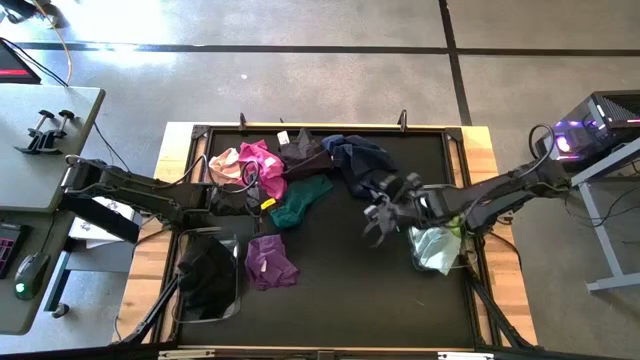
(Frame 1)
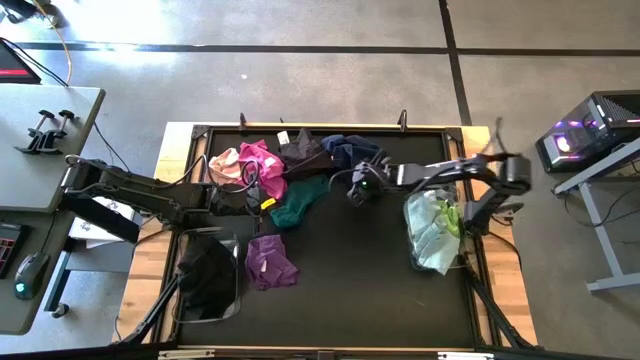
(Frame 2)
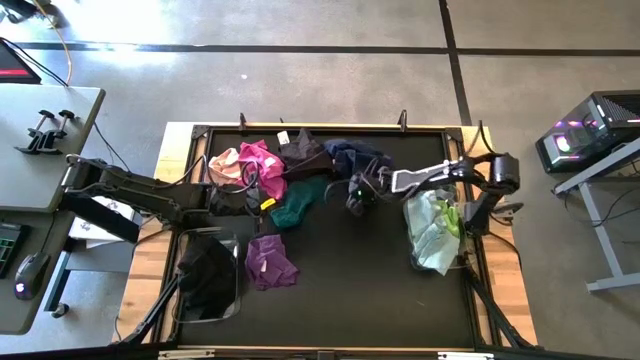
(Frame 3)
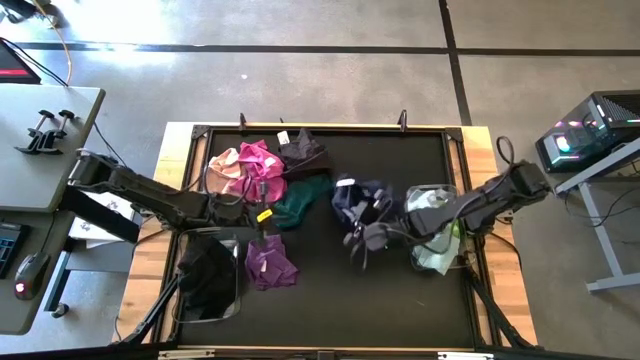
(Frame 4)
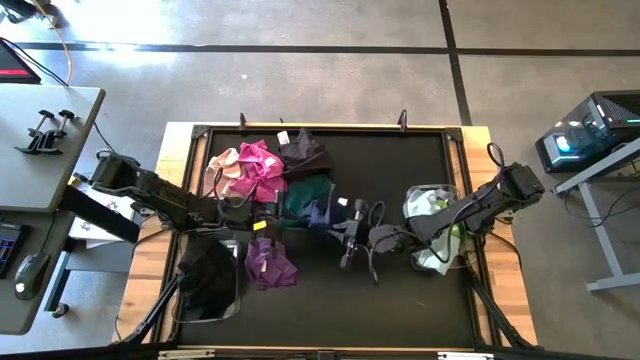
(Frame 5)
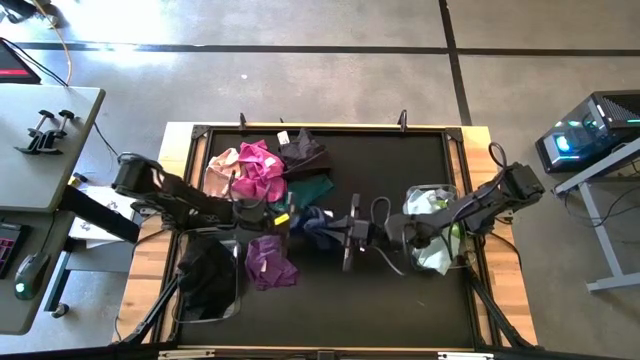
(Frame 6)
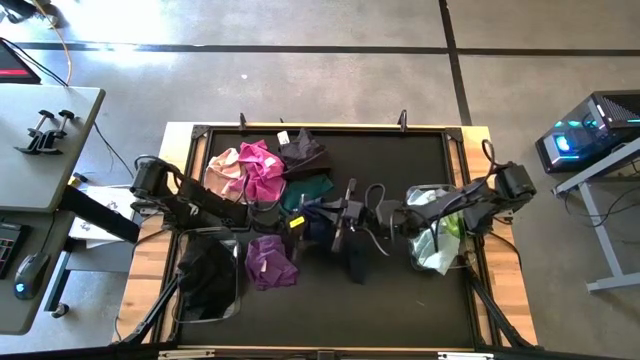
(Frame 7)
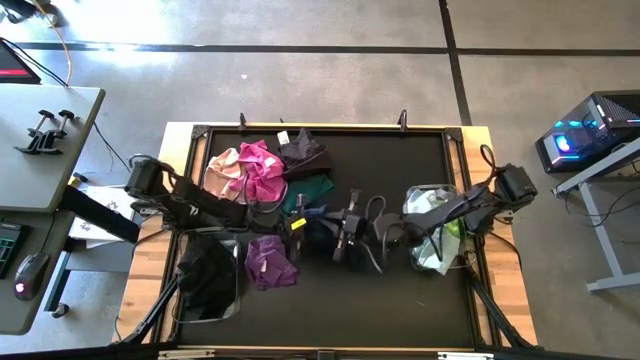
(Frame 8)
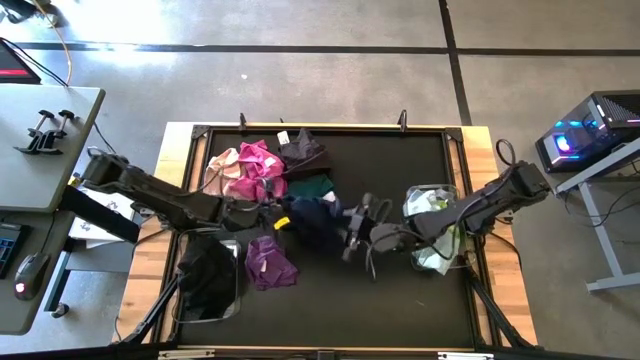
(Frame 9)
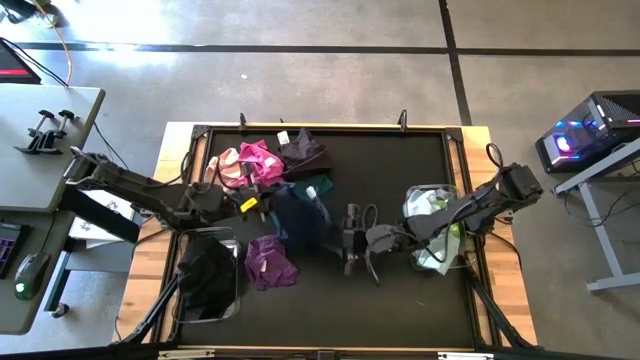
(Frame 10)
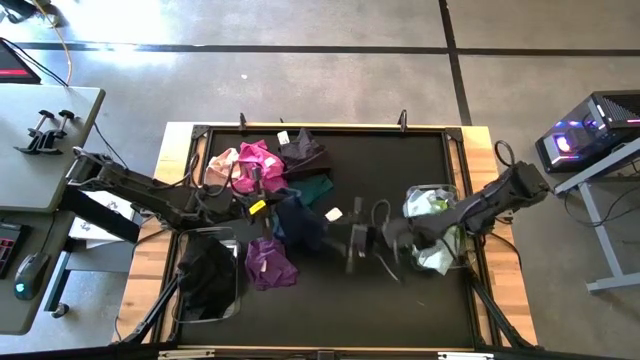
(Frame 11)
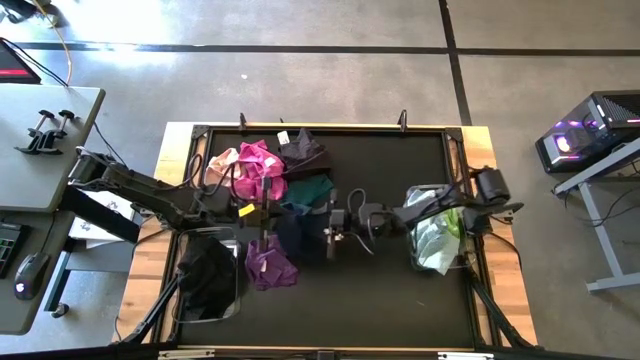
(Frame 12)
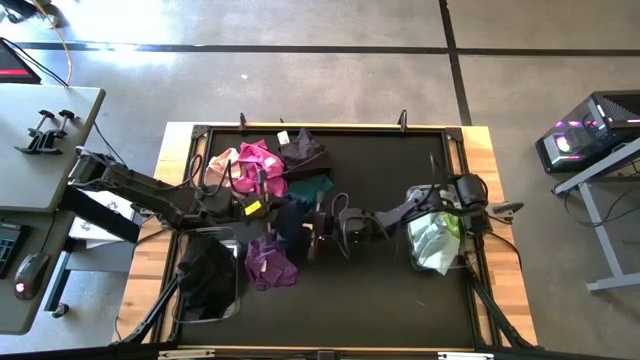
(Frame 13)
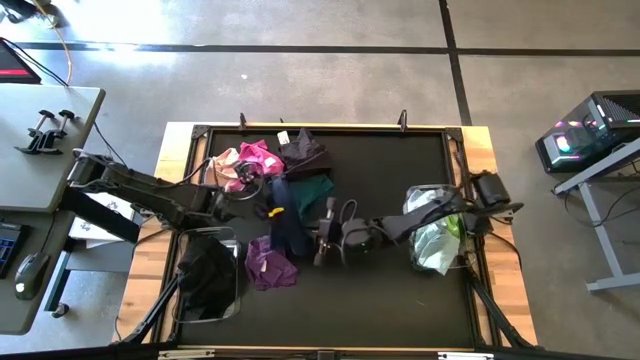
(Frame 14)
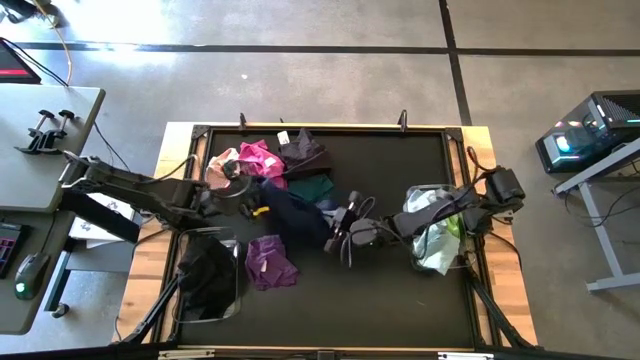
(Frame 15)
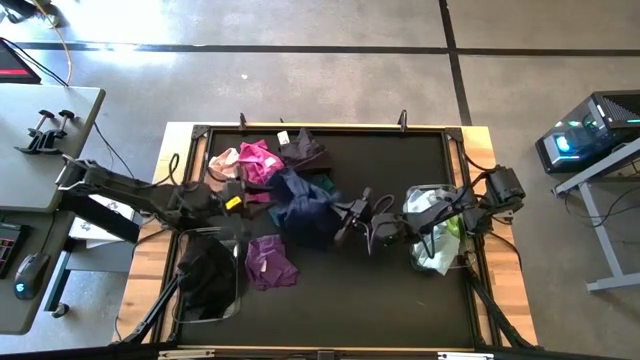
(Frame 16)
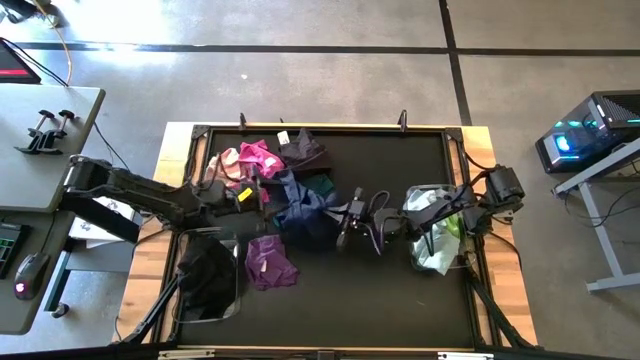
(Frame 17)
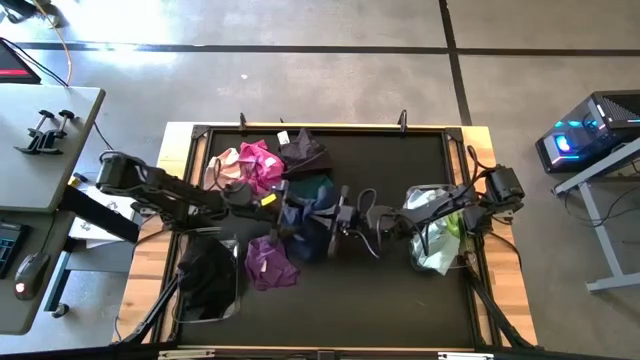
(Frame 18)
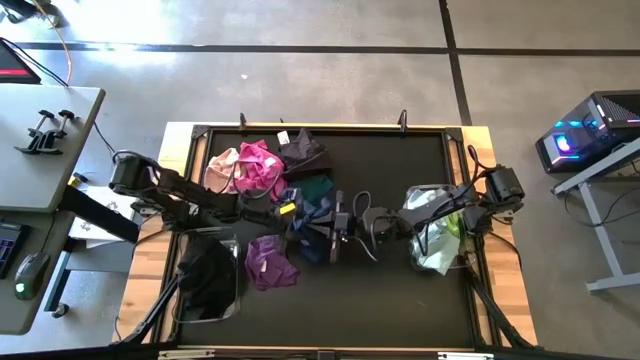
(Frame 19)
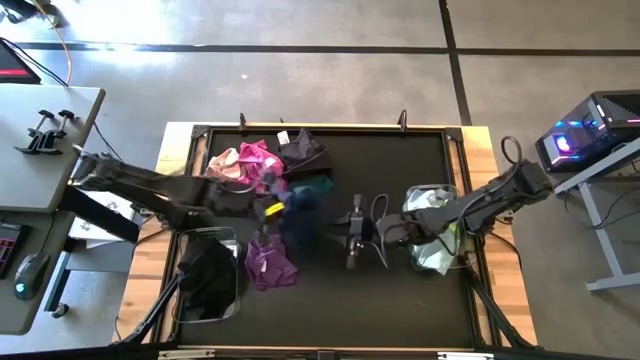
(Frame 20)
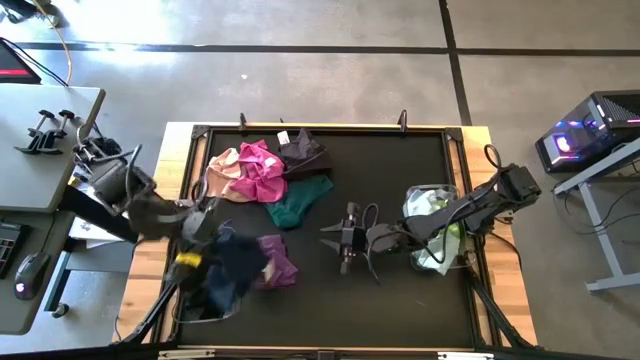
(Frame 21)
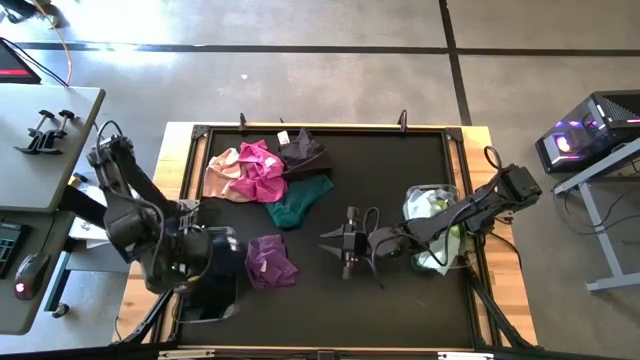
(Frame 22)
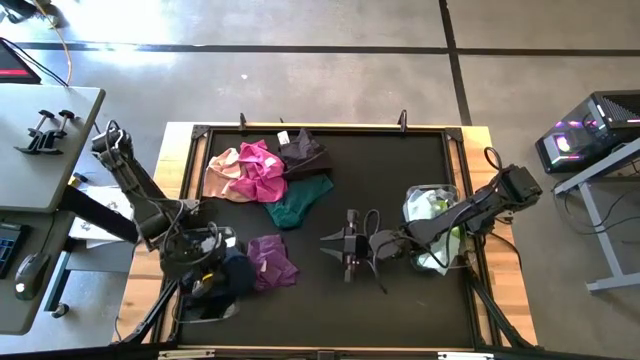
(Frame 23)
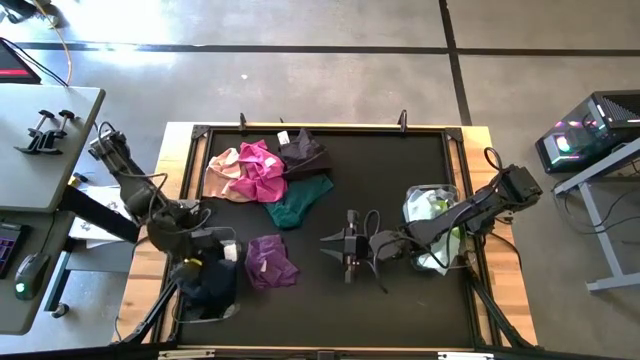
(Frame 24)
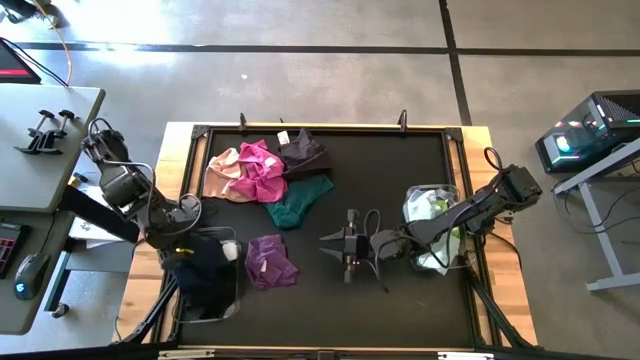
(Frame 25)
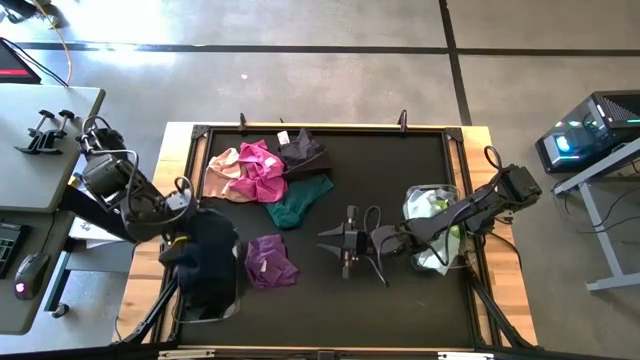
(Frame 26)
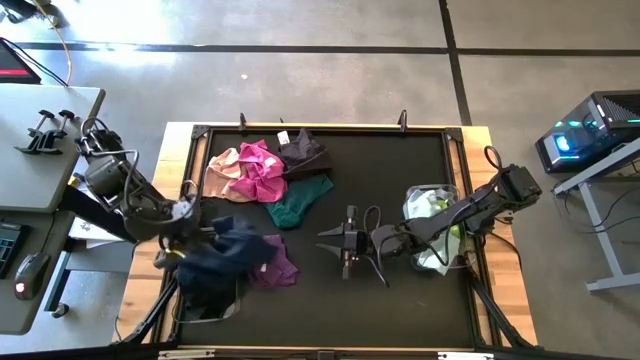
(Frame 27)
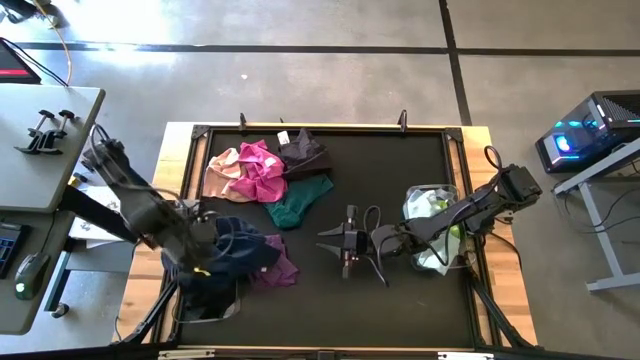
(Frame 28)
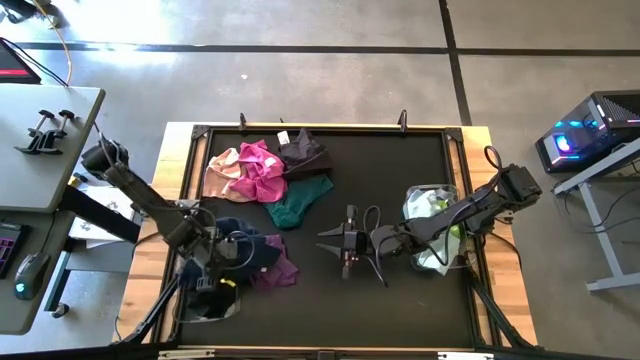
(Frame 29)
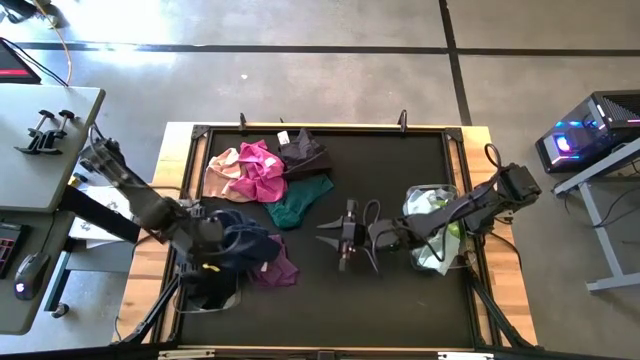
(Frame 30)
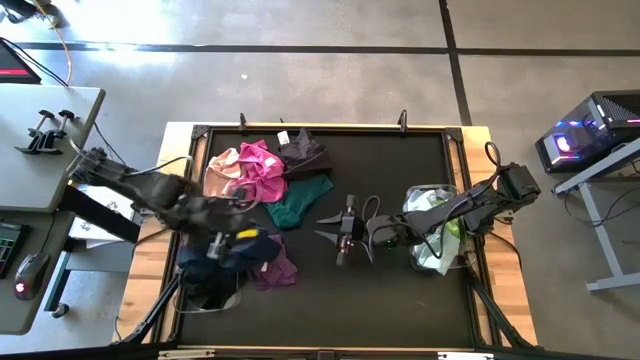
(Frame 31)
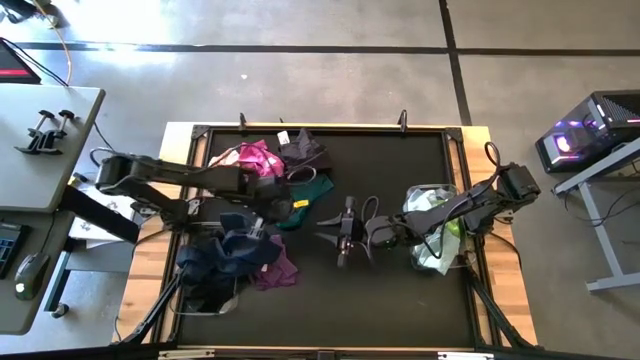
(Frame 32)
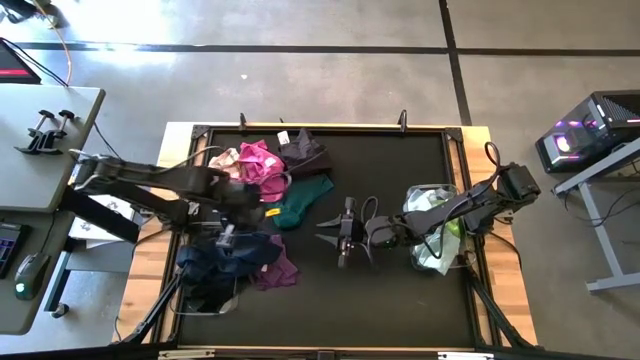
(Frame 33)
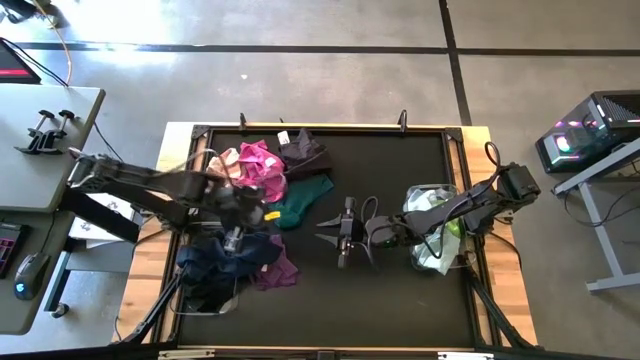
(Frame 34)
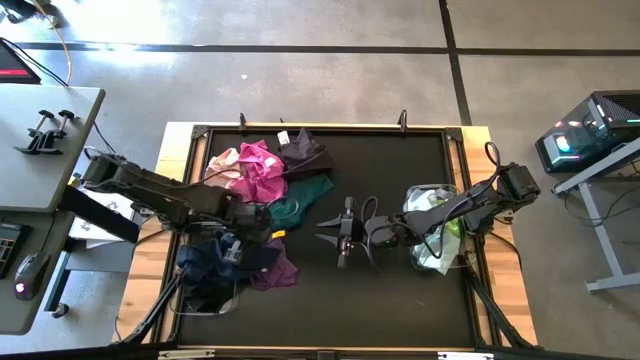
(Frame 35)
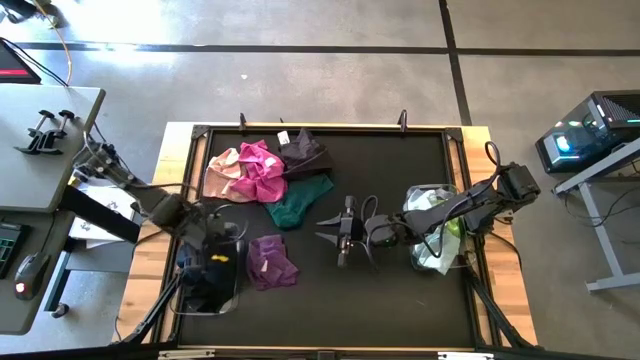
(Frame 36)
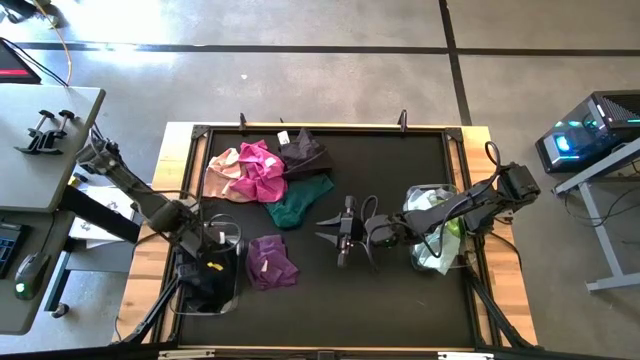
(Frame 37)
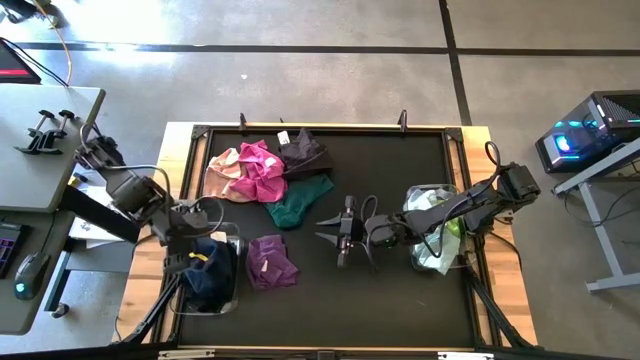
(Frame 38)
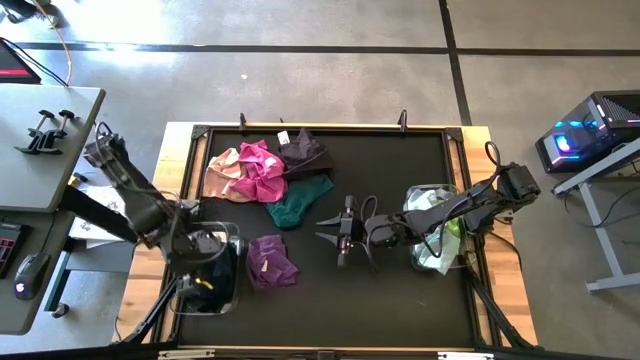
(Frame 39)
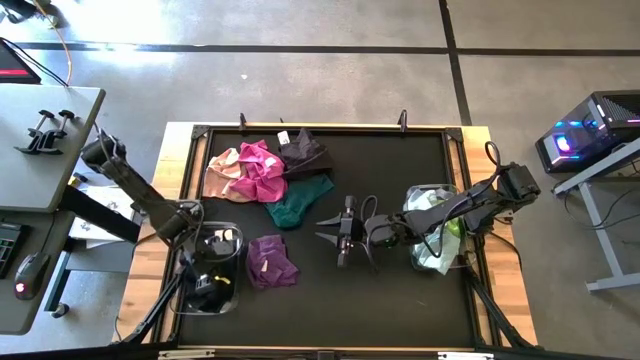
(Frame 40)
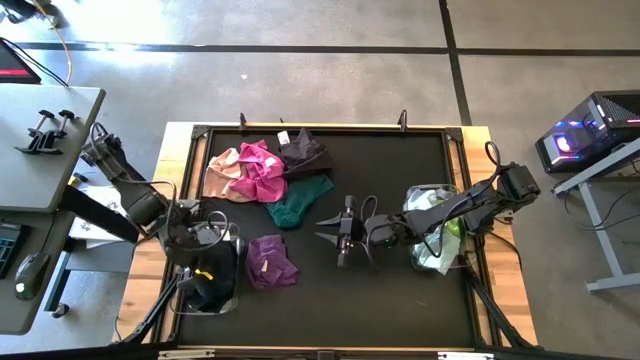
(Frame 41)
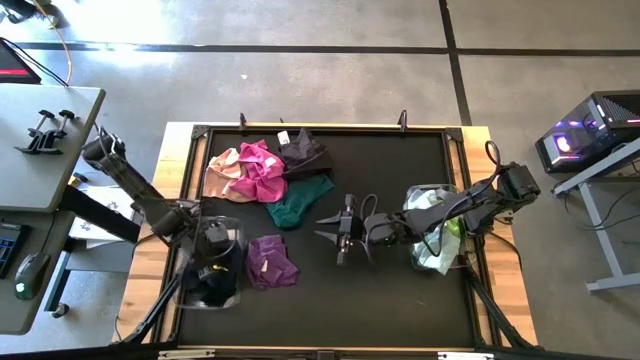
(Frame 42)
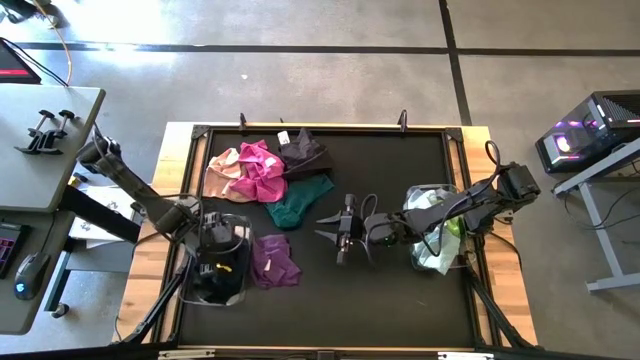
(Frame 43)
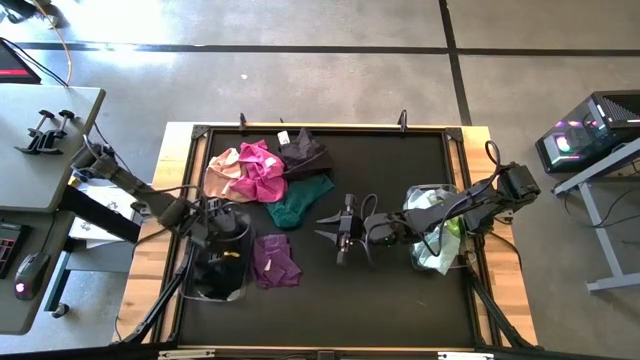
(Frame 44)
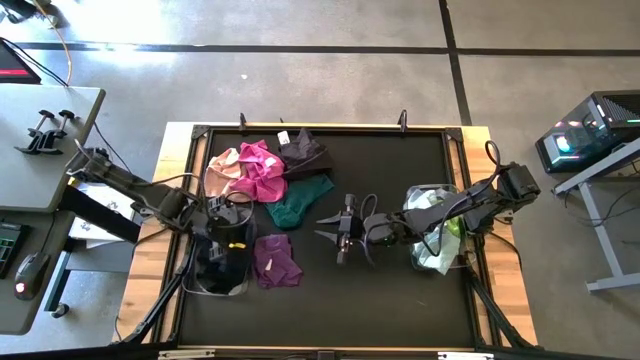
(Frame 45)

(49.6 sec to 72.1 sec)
Task: Sort towels by color in basket
Put the dark blue towel into the left transparent bin
